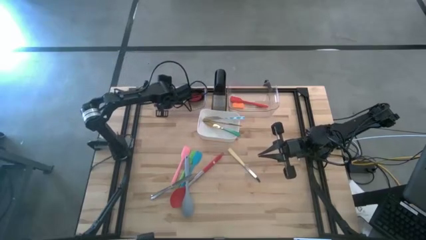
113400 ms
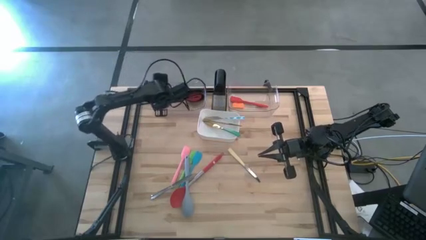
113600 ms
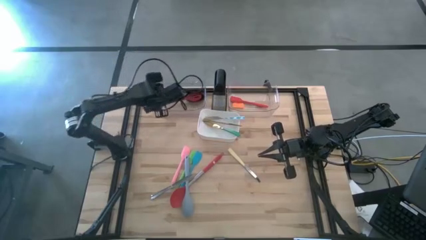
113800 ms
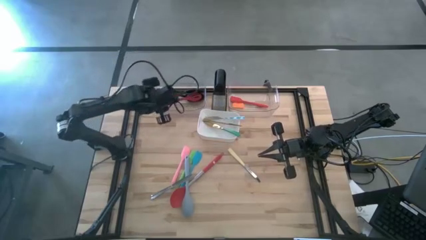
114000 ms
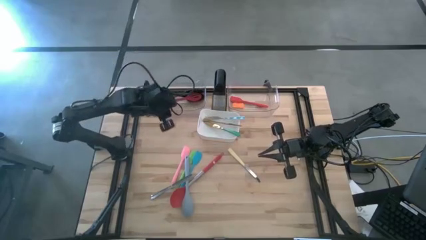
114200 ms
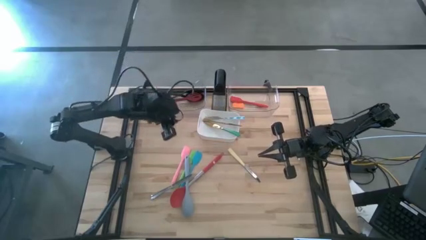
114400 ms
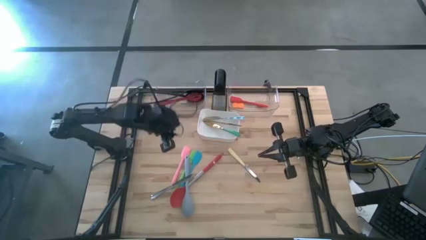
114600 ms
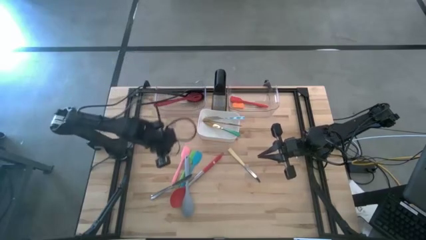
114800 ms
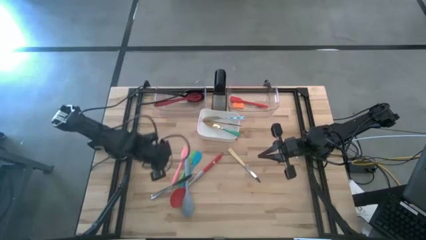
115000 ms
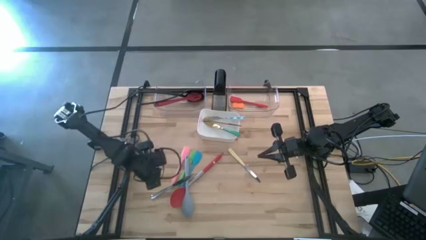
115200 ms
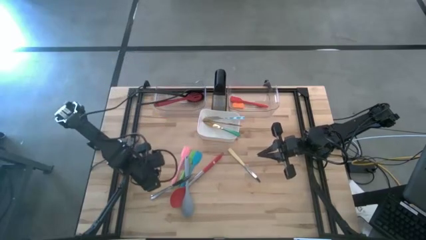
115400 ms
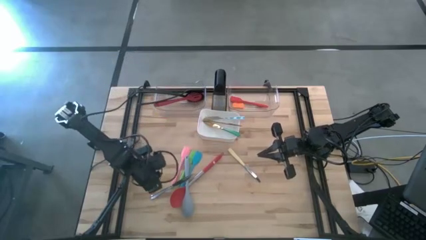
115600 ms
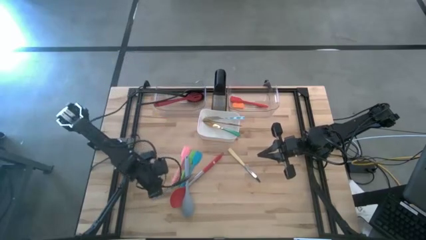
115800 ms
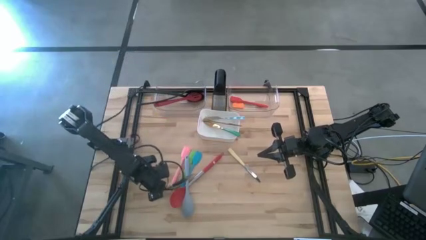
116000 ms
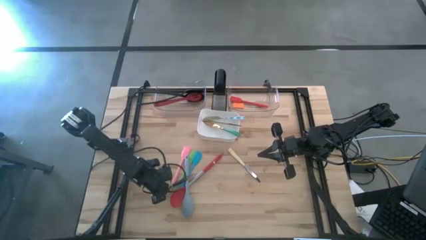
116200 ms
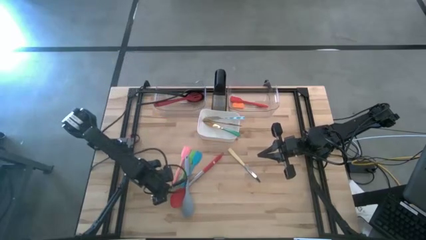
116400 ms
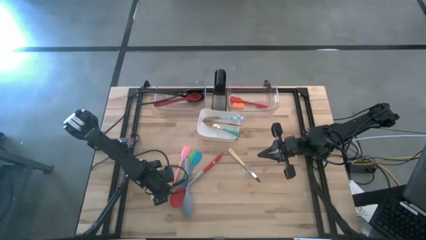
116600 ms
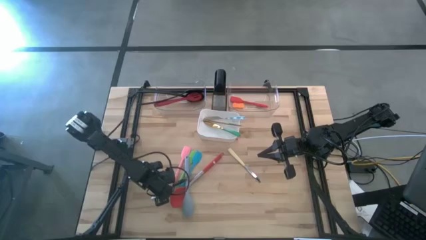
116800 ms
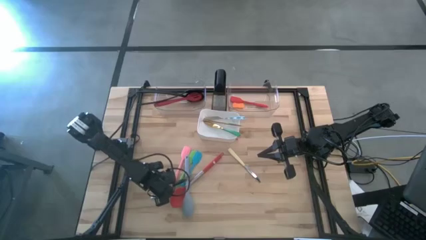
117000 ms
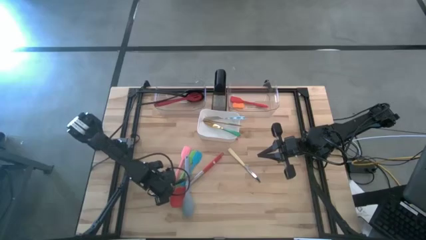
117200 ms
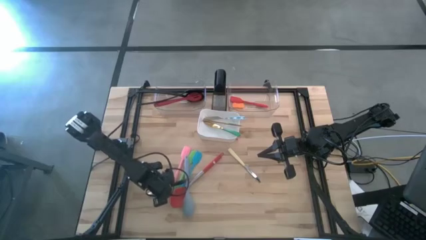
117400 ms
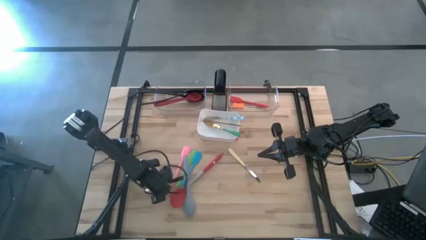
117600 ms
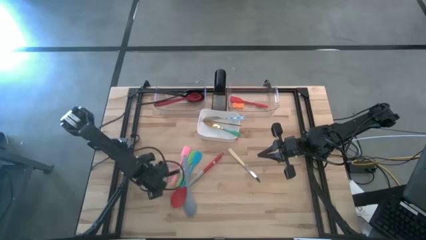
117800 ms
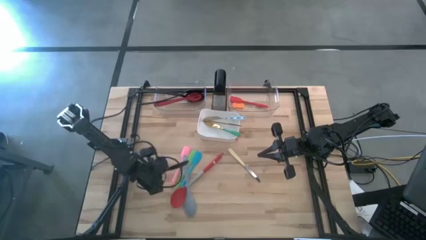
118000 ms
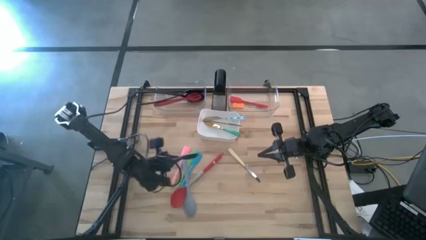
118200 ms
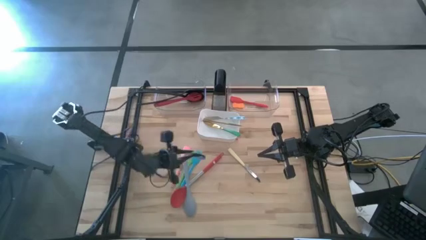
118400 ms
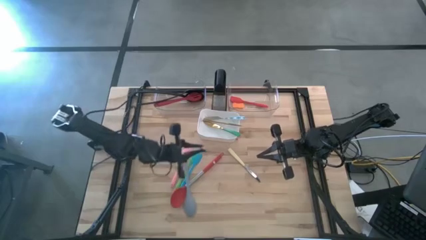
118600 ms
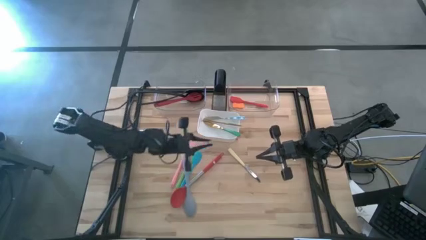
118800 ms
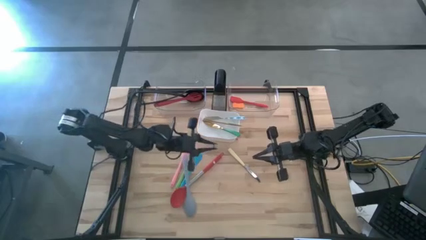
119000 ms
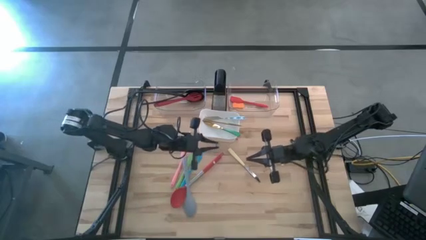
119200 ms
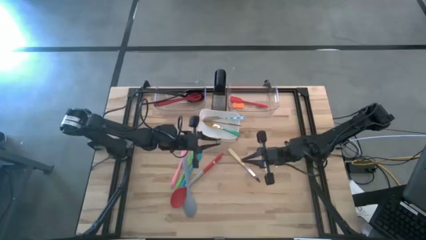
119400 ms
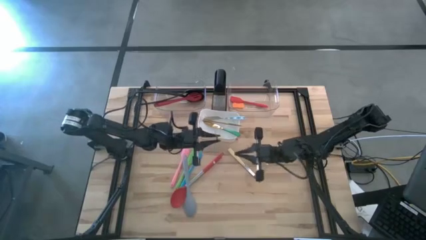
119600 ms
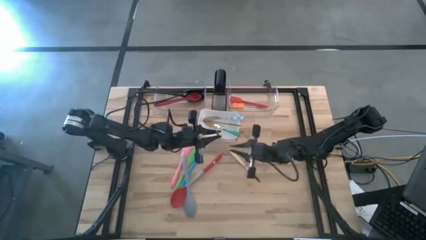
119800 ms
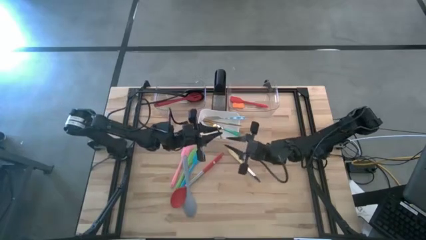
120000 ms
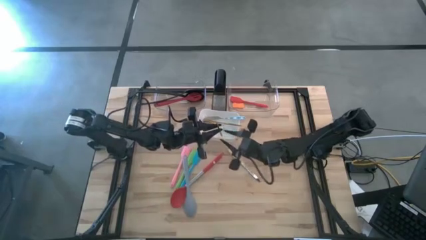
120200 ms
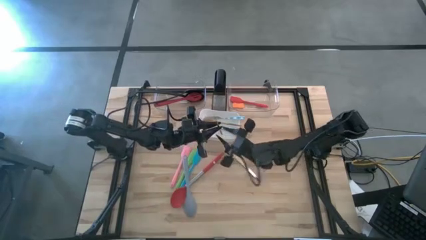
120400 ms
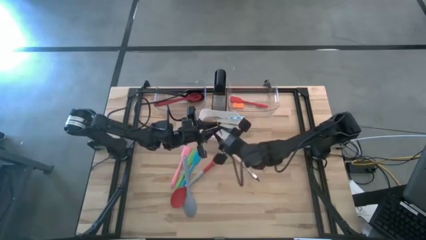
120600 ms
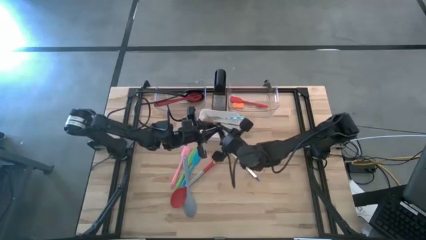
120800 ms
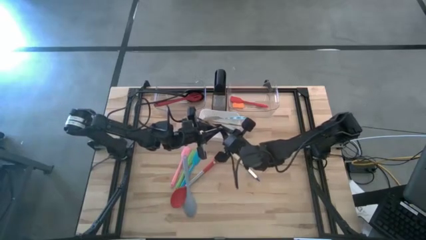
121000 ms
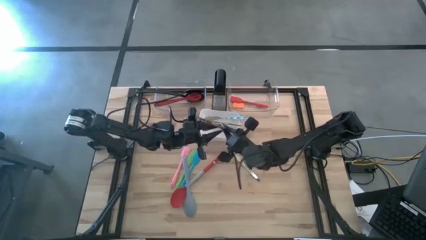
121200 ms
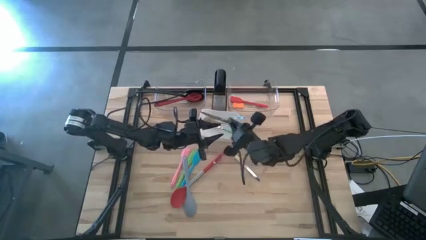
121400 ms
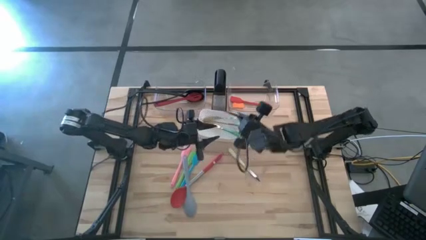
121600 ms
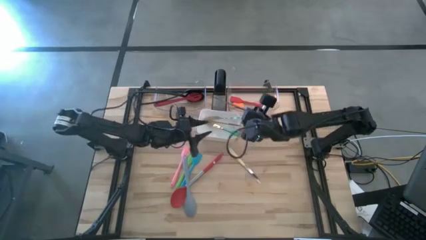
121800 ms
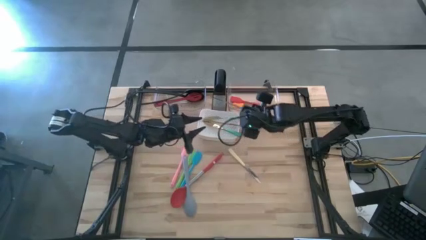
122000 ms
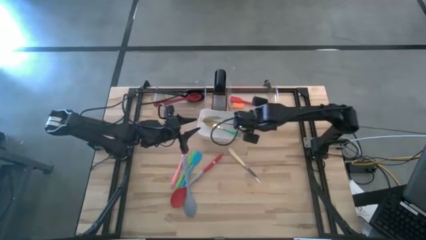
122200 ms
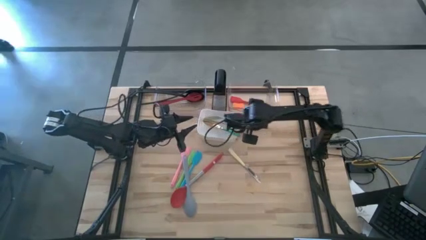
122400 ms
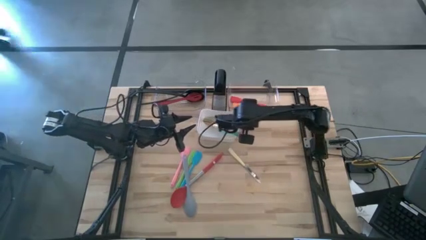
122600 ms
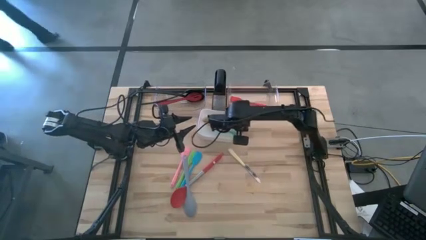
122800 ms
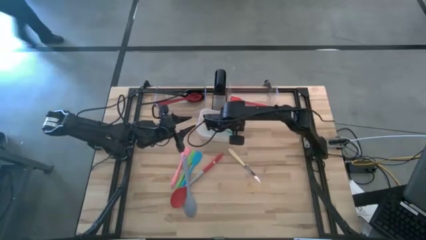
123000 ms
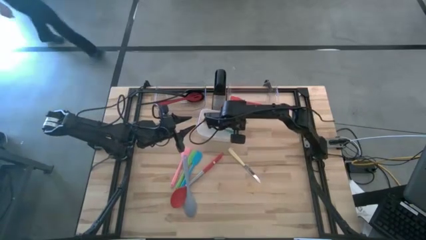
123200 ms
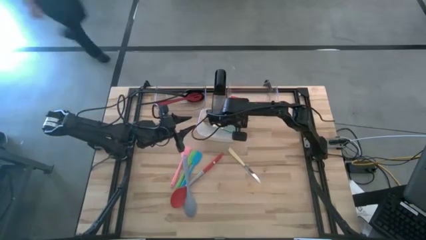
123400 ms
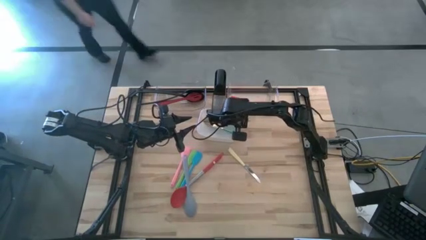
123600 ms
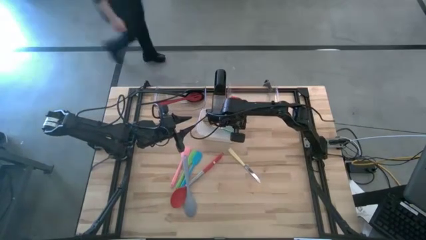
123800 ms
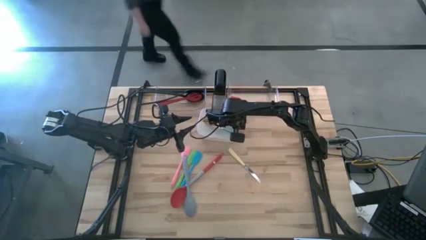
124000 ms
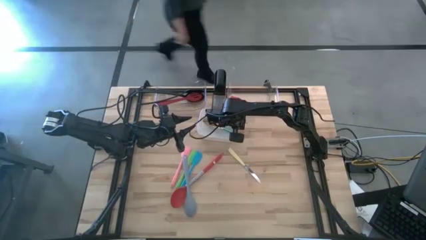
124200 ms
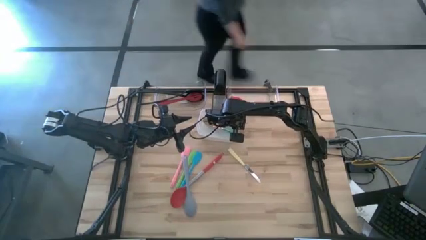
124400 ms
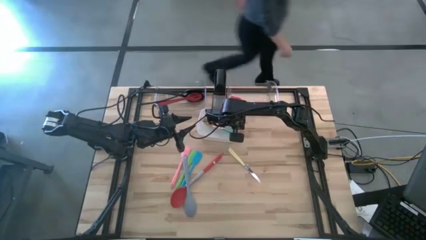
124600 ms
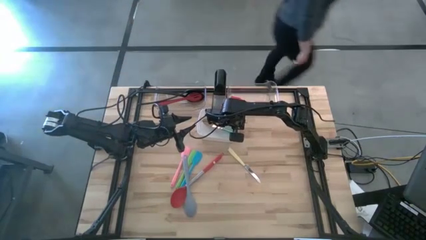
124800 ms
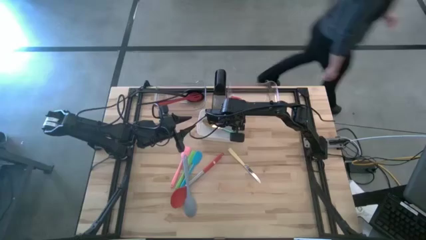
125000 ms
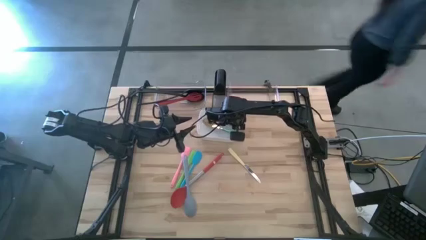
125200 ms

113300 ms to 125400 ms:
Task: Pick & Place Kitchen Items
Put the silver table knife into the white bin

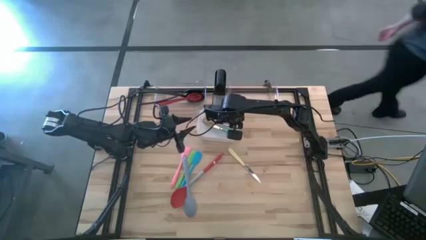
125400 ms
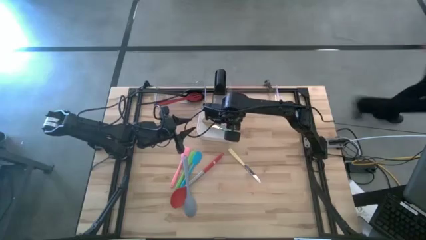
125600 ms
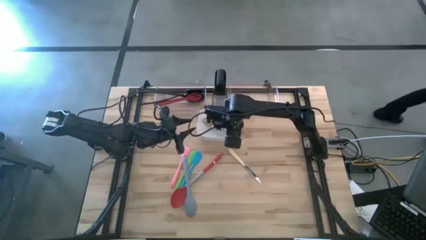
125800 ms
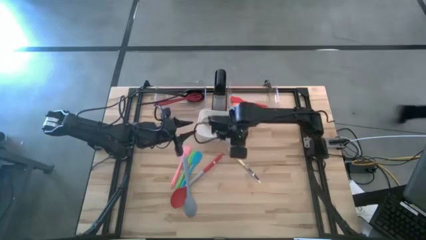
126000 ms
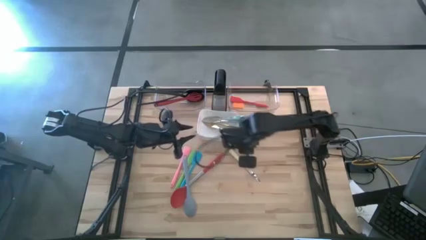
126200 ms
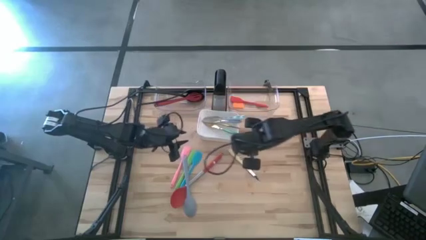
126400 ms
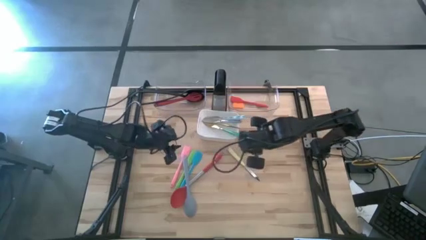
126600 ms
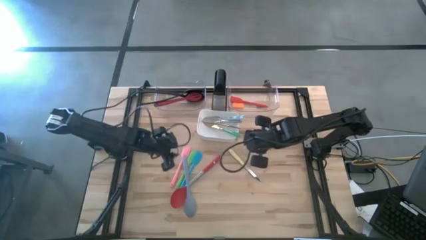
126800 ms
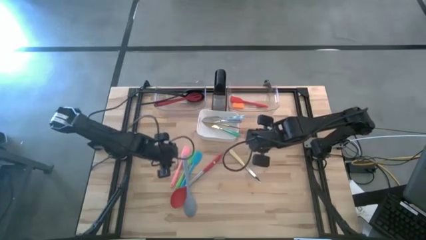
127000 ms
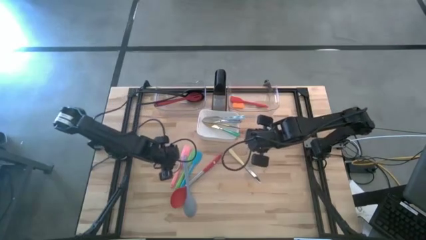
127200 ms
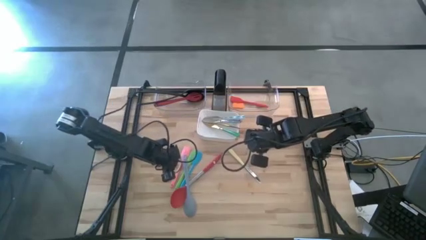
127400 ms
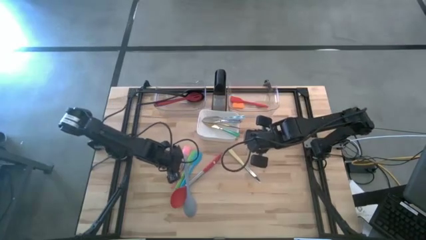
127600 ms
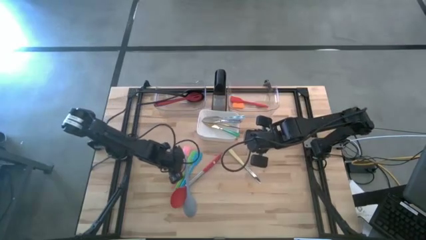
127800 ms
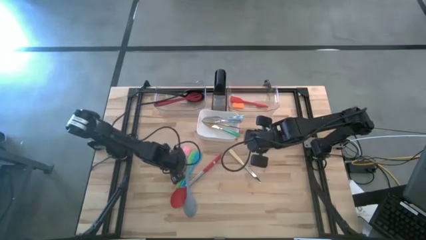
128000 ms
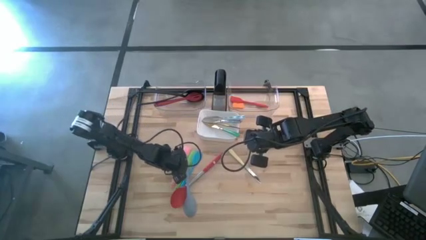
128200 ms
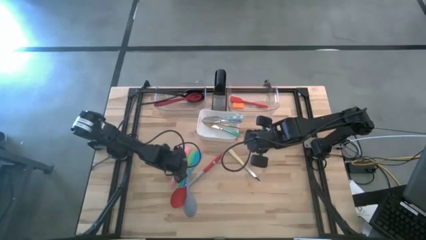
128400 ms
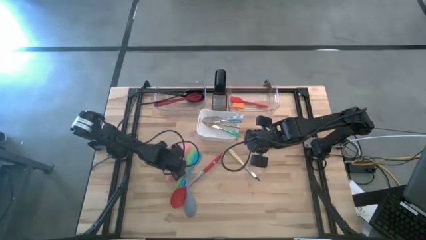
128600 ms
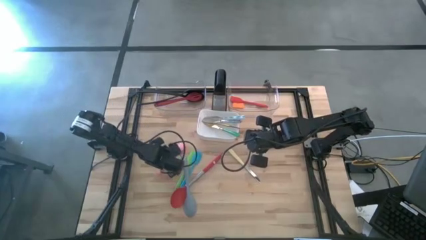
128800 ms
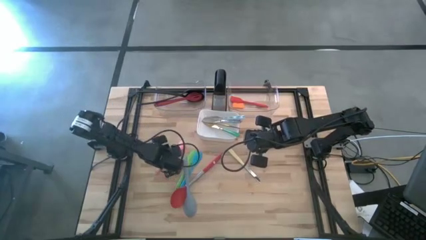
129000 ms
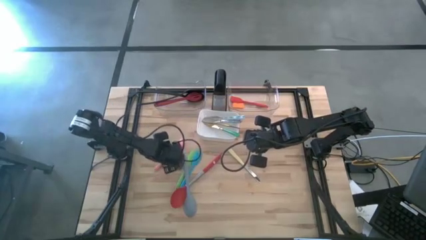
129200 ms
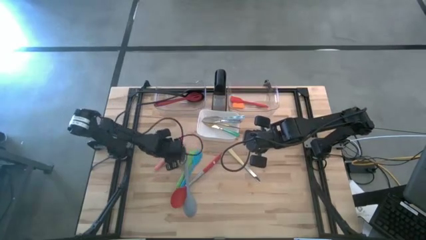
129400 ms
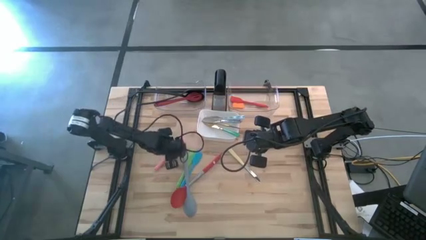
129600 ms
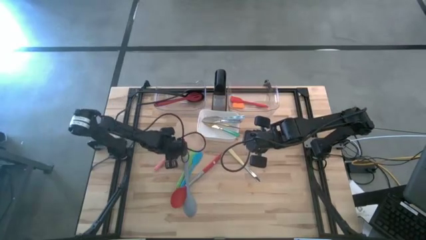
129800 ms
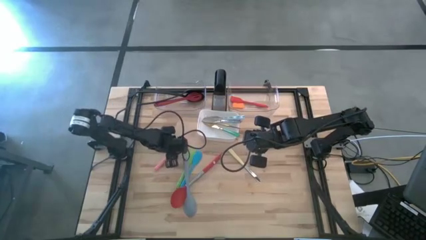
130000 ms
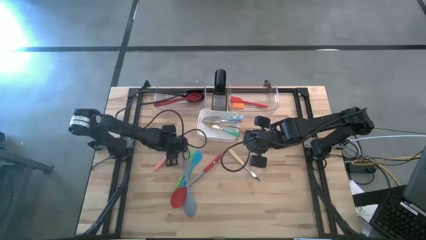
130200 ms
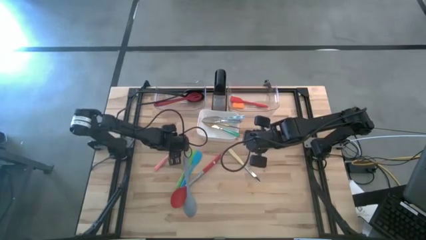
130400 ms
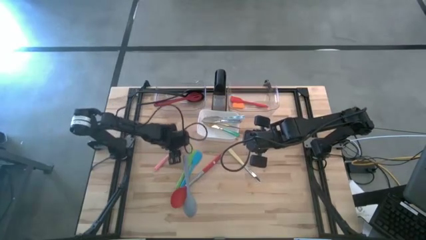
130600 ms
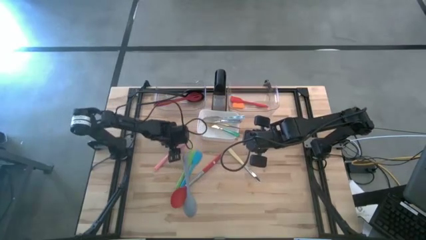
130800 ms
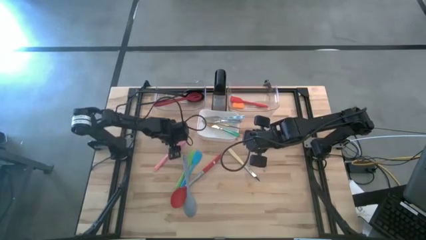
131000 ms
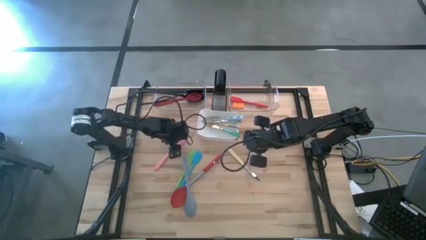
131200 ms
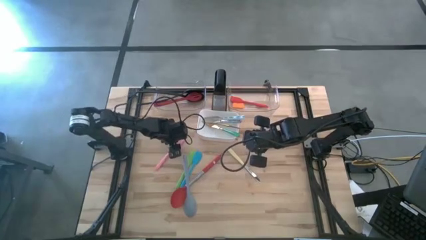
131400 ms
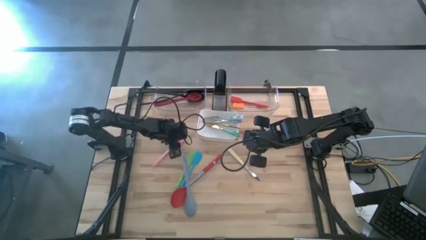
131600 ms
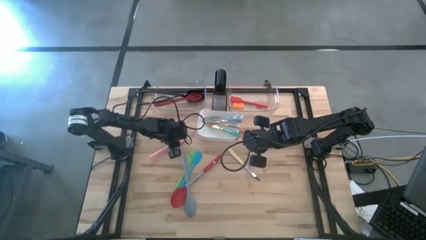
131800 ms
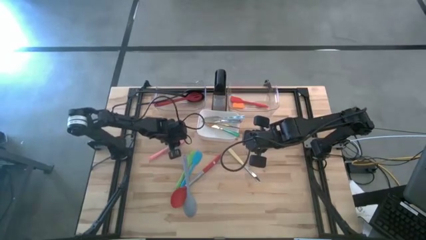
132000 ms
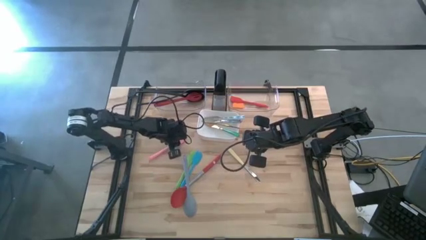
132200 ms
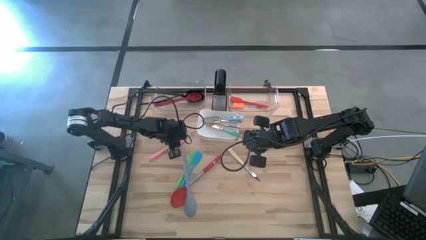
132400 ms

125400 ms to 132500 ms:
Put the pink spatula into the right transparent bin
